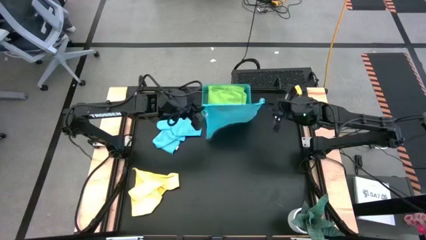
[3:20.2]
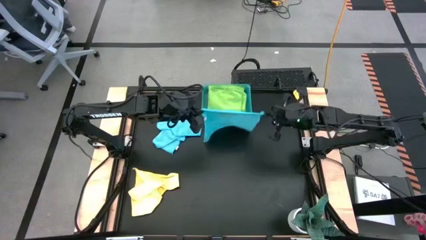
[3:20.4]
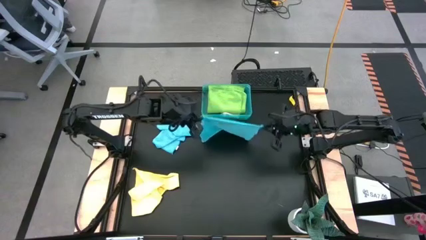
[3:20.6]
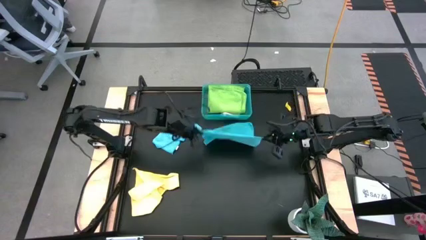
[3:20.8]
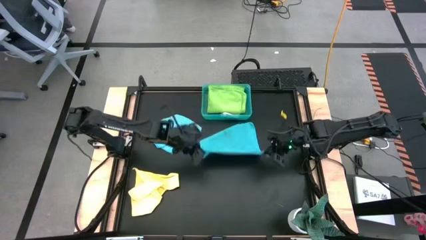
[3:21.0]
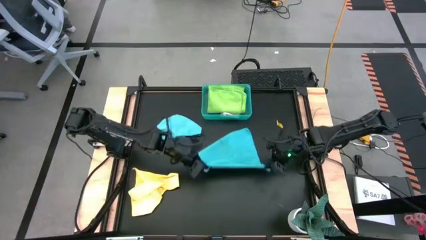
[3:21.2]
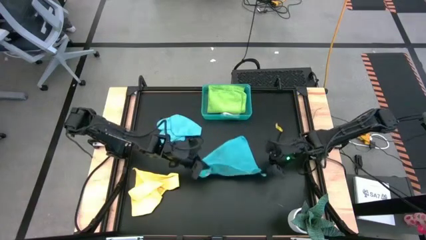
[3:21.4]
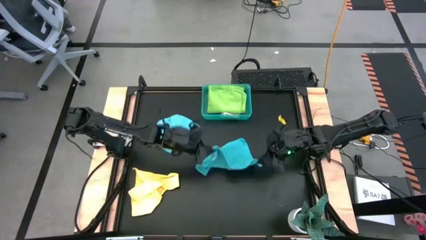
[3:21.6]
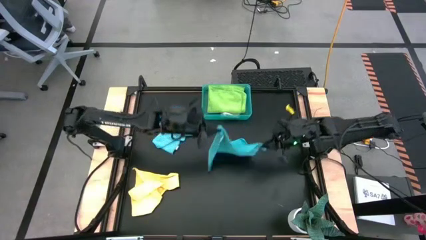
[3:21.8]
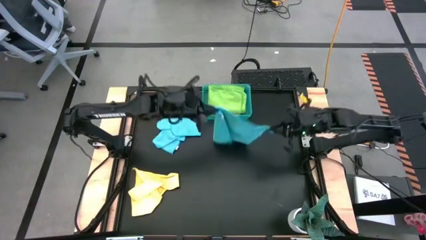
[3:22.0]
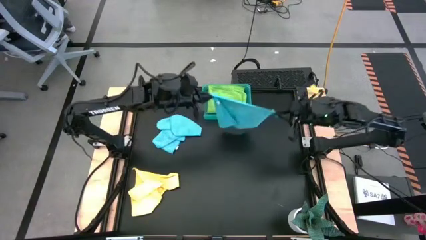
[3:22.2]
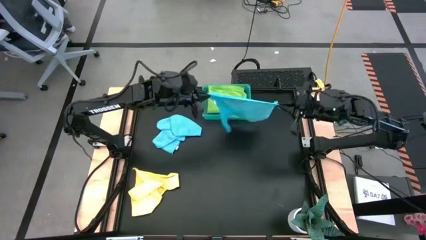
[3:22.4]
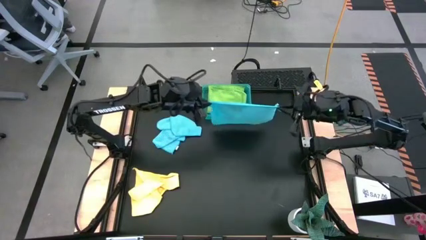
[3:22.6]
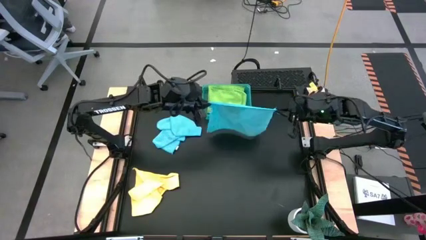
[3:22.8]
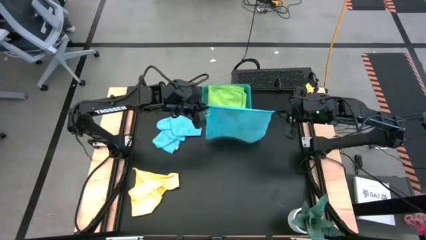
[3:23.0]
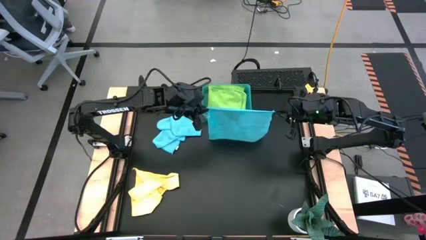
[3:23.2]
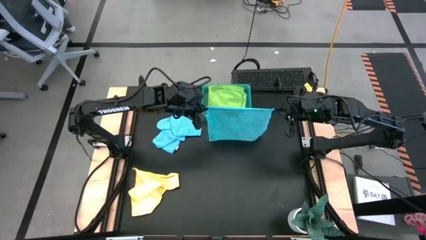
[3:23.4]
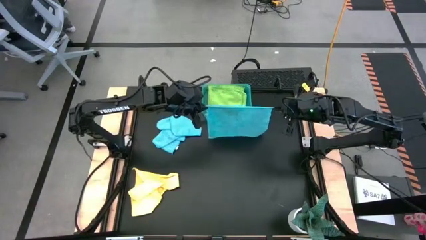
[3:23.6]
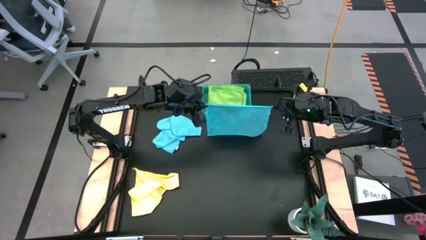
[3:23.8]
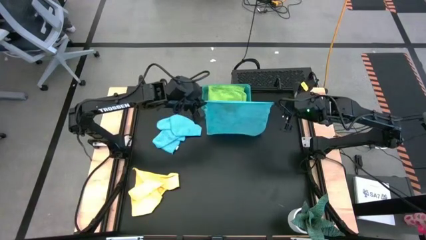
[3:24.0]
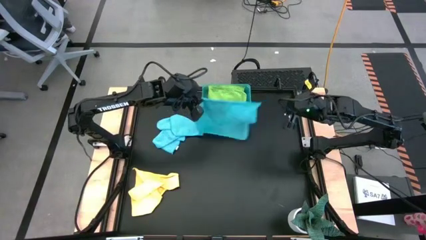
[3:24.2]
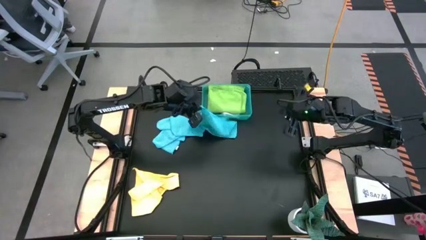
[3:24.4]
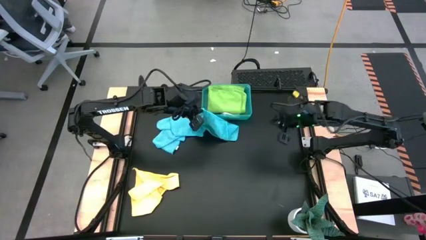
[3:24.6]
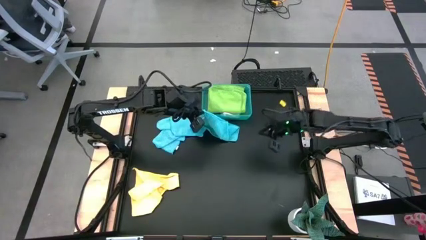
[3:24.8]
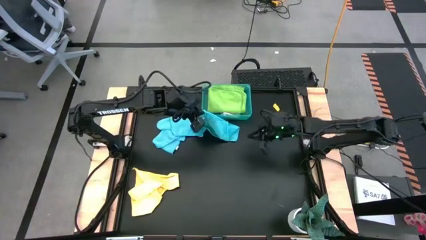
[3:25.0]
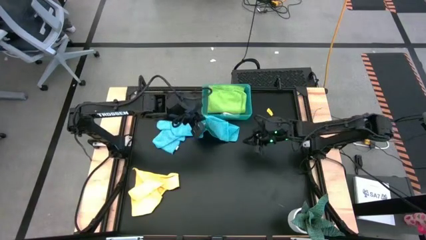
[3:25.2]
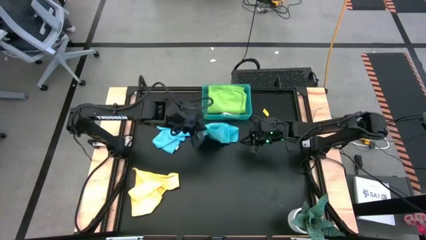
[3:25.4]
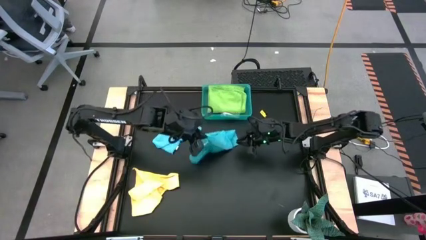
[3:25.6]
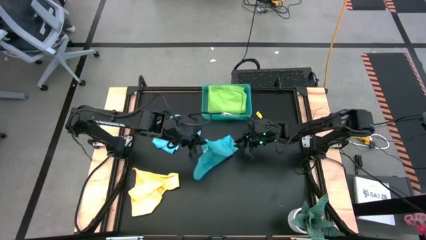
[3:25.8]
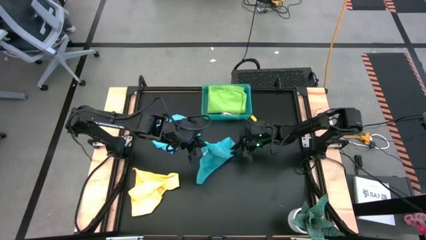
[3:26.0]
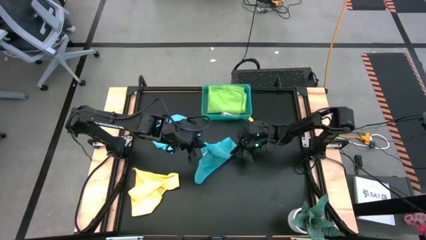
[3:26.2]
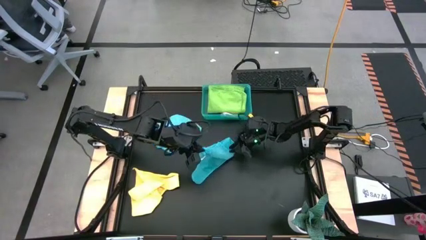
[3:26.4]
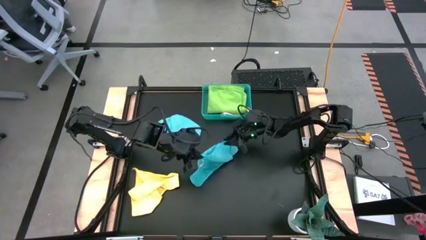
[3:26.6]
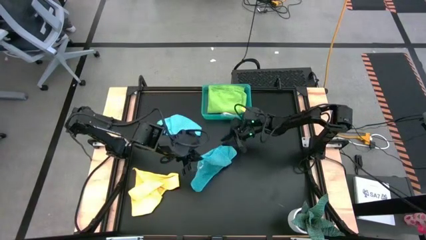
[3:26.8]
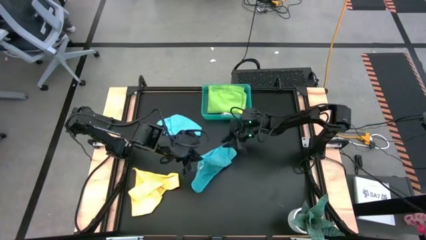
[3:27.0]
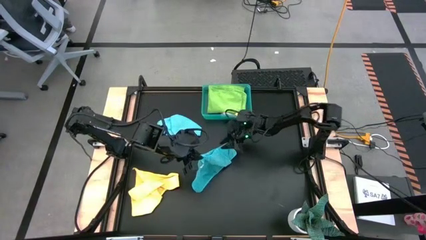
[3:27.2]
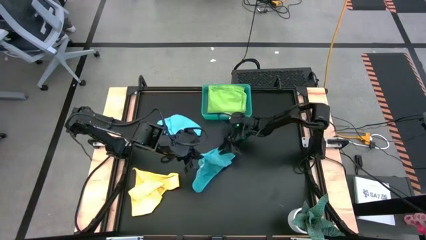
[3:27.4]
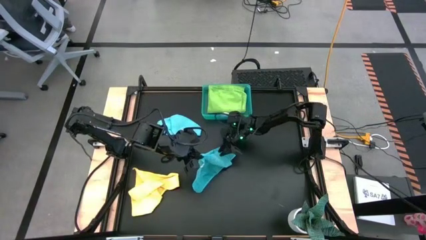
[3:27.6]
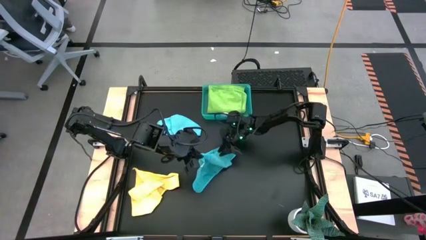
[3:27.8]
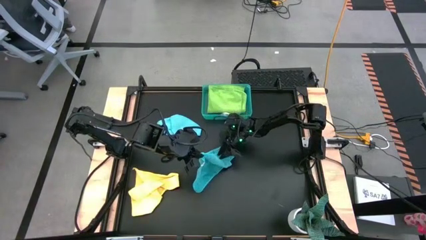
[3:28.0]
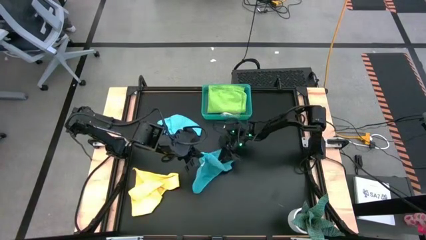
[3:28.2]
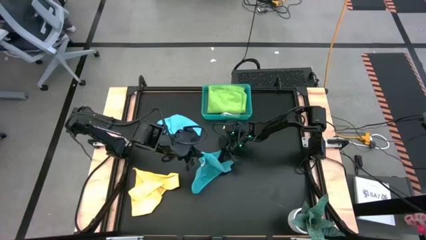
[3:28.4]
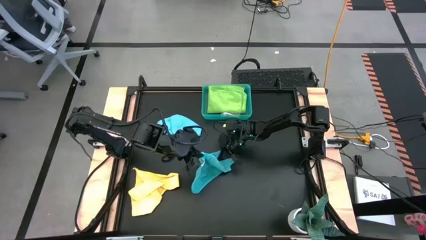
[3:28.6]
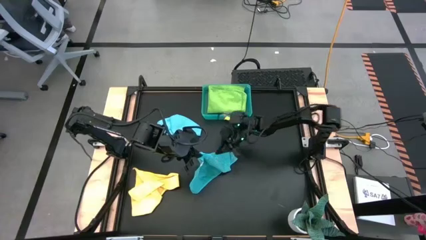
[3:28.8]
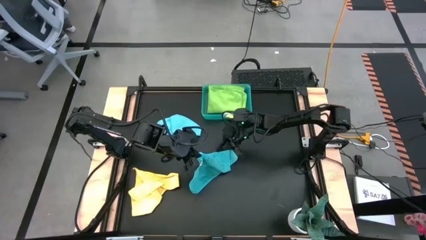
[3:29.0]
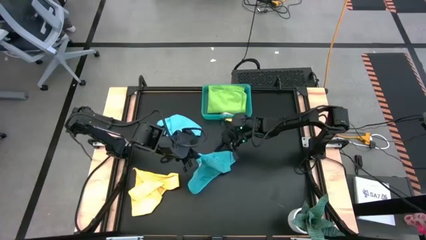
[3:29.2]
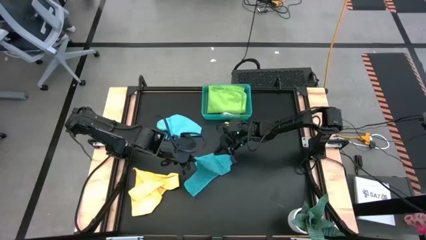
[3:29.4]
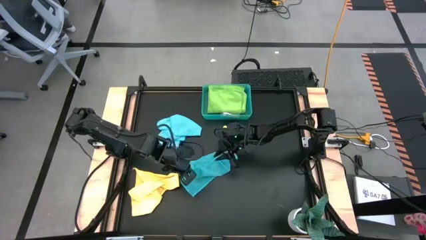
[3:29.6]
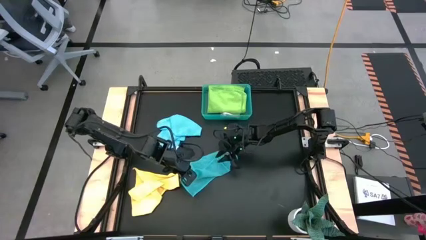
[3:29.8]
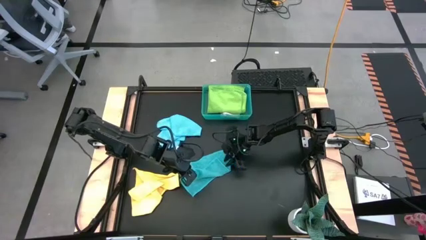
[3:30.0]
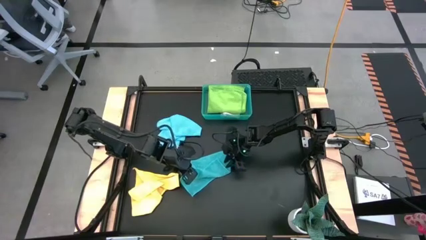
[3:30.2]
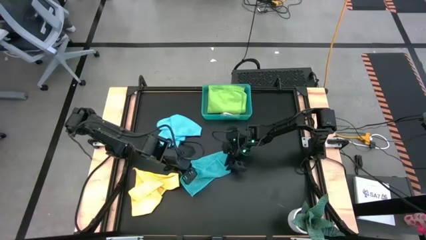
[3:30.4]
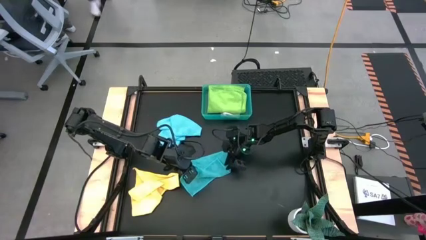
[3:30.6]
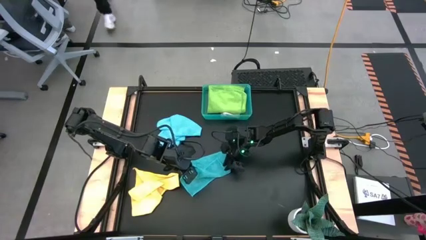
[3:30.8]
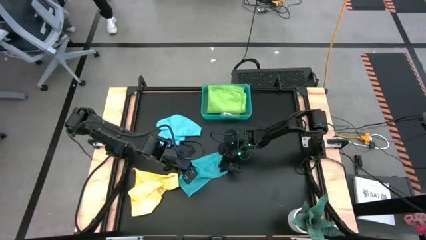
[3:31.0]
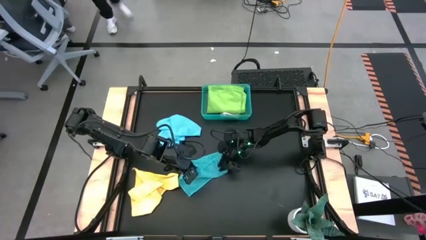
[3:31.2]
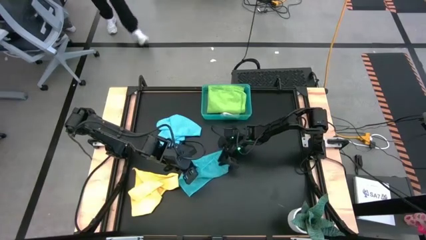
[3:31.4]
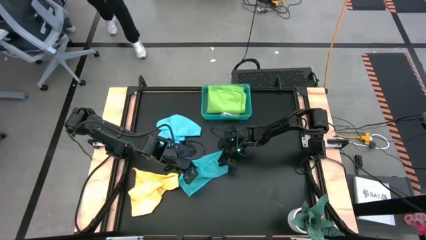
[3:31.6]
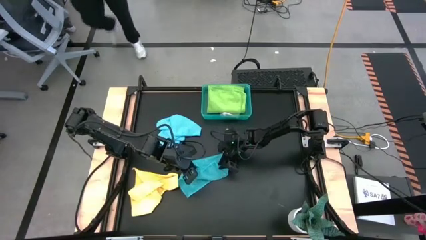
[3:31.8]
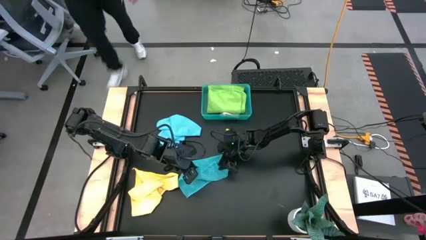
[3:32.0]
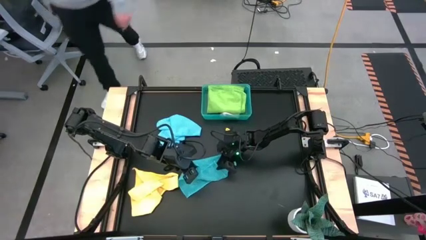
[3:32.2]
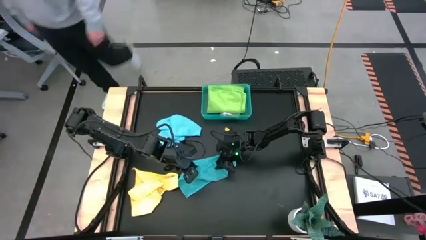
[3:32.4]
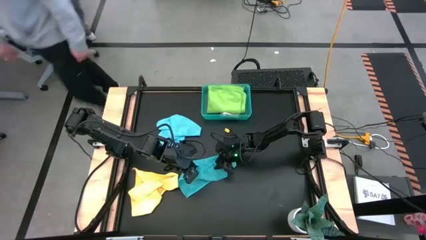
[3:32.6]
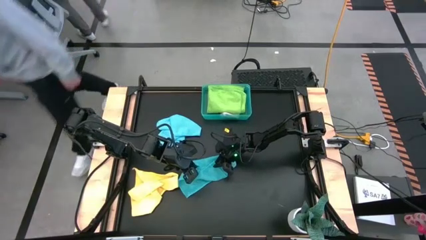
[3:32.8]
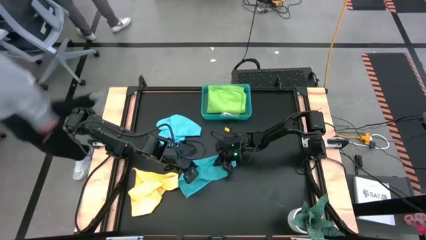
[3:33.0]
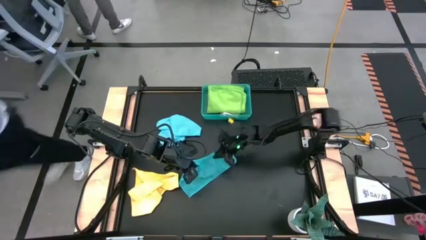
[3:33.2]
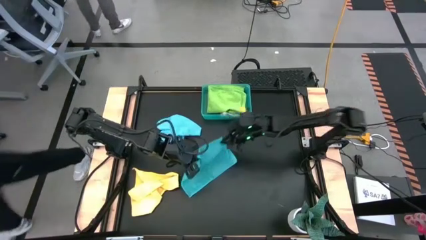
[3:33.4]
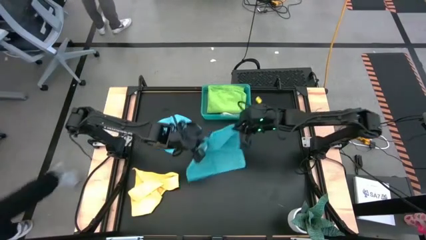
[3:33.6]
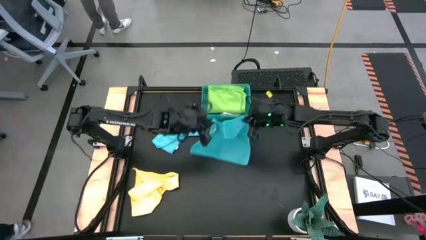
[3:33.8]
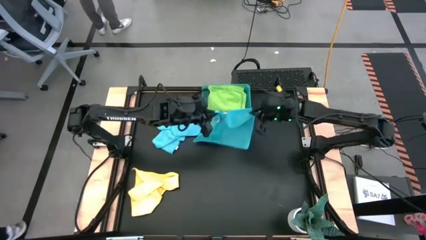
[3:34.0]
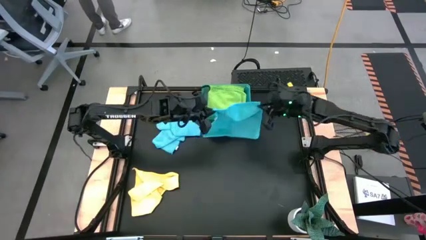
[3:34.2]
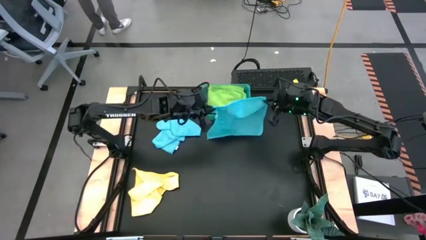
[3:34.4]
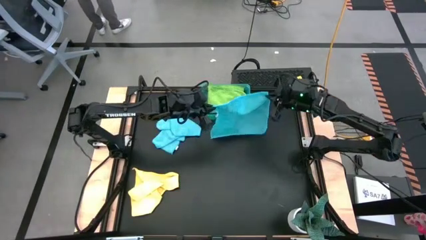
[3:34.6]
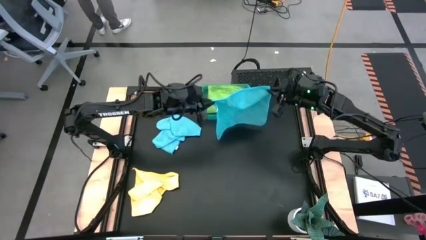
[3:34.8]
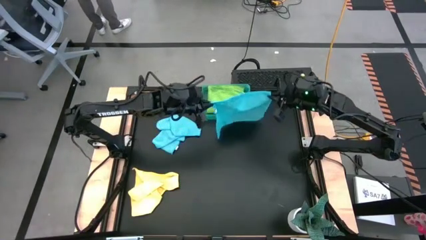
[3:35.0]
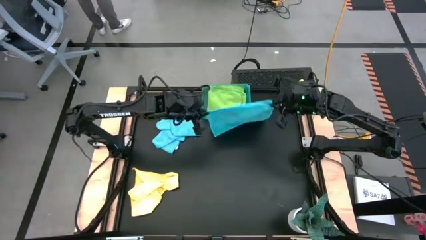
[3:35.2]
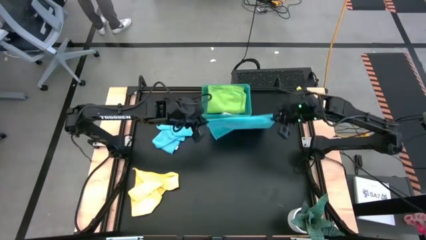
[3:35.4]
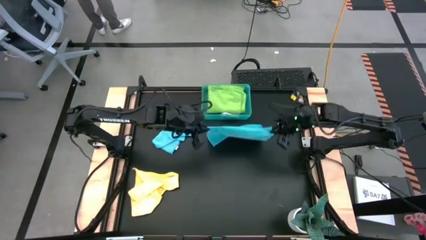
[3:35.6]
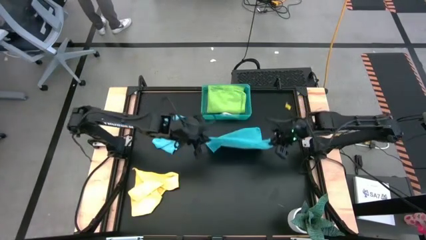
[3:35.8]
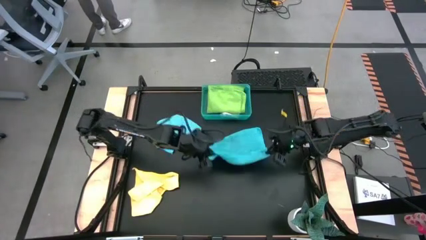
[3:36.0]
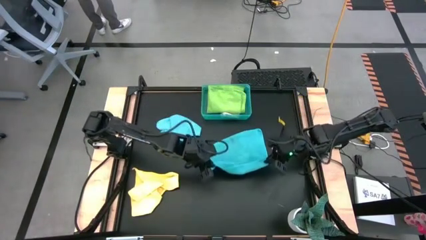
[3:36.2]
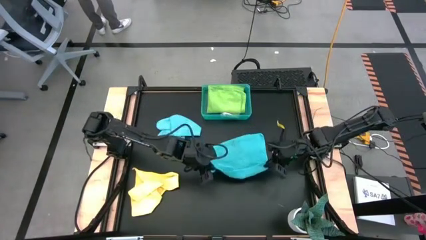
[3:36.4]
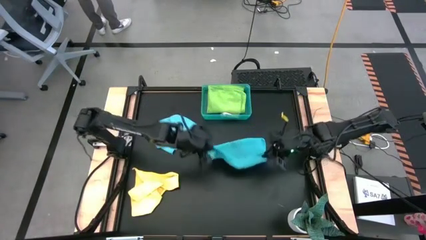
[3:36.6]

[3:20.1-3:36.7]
Task: Fold microfiber towels
Fold the bottom blue microfiber towel
